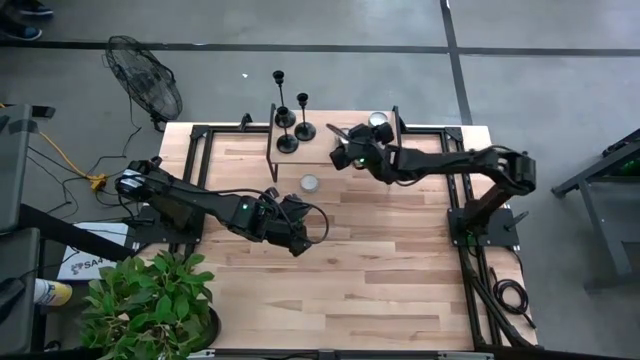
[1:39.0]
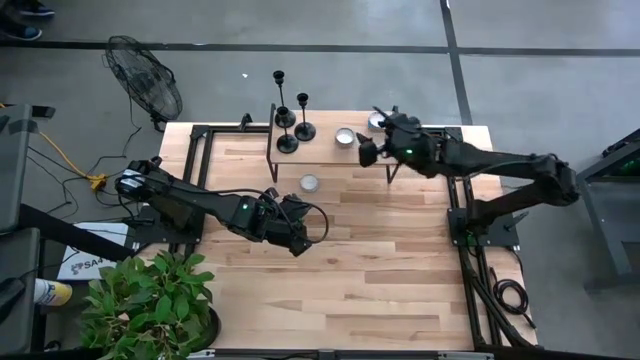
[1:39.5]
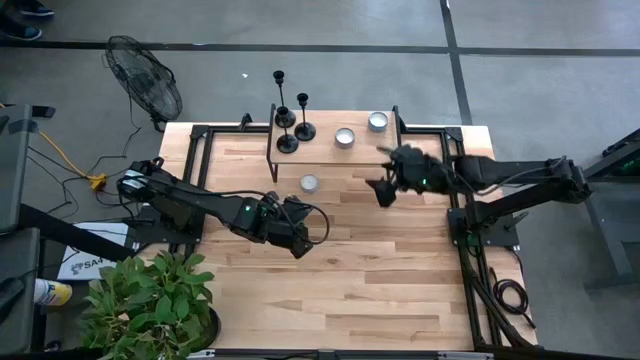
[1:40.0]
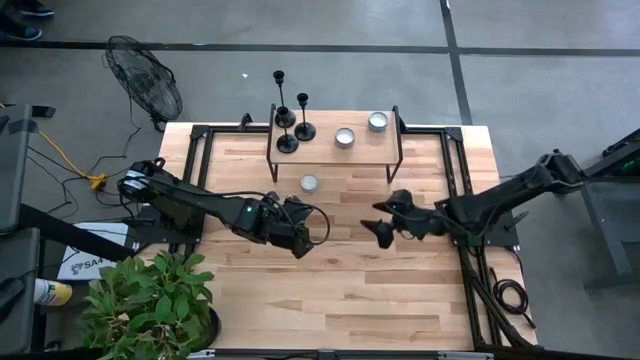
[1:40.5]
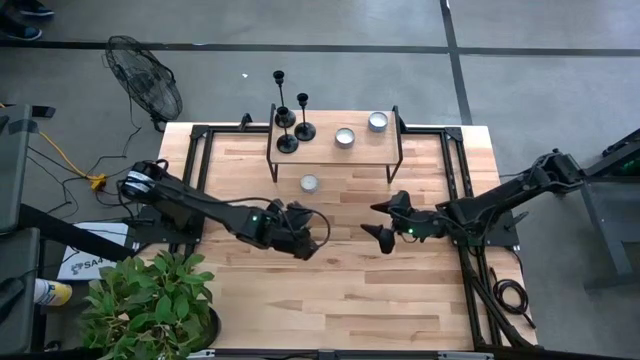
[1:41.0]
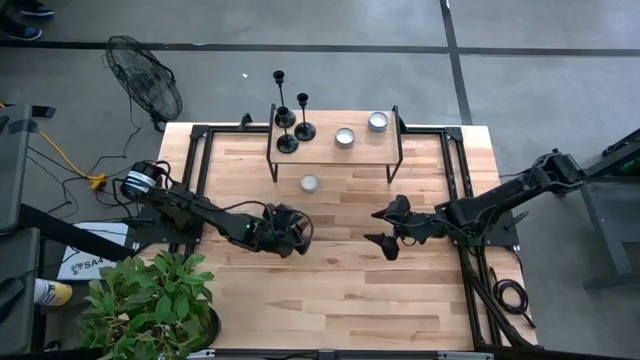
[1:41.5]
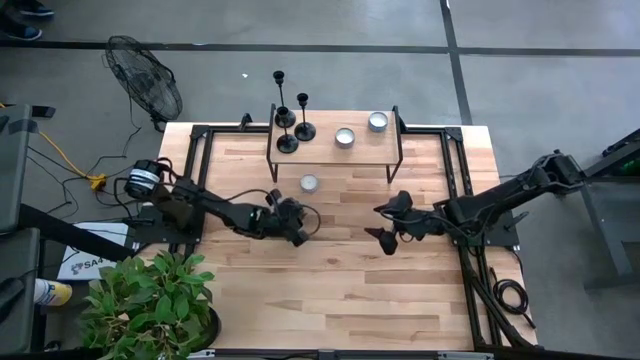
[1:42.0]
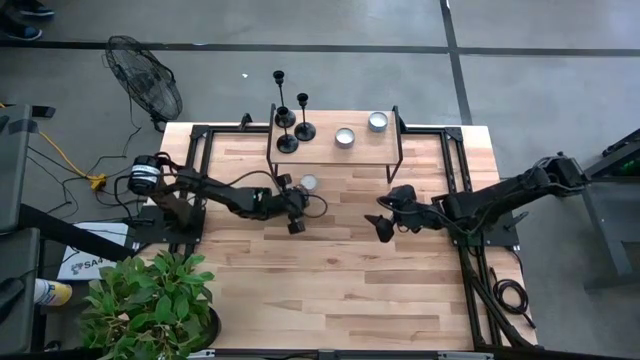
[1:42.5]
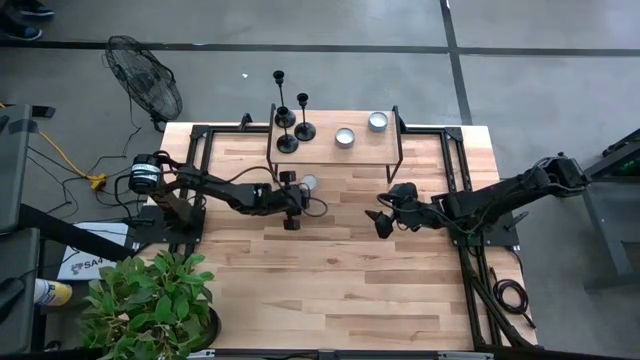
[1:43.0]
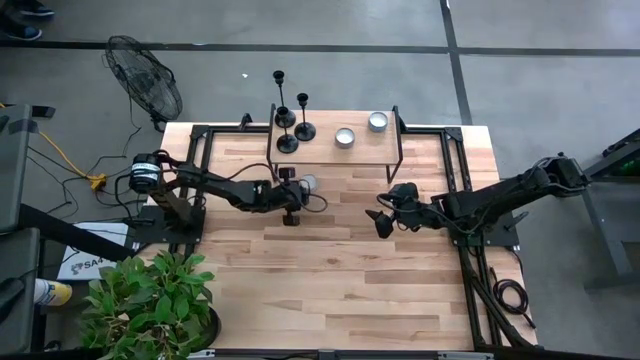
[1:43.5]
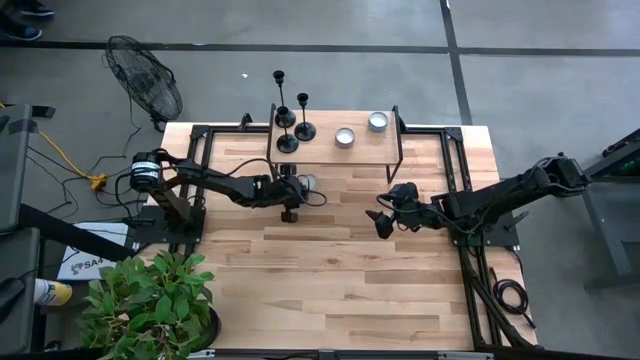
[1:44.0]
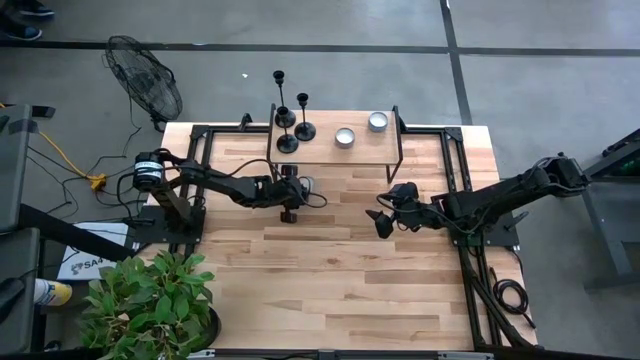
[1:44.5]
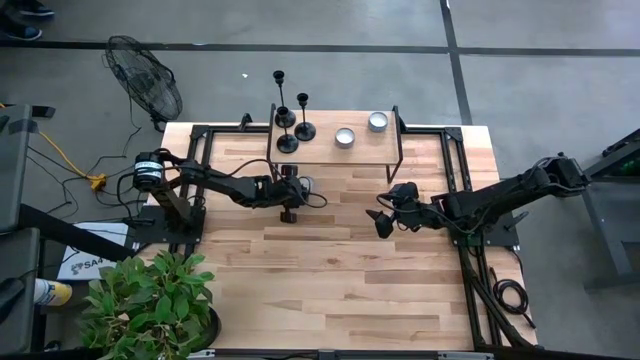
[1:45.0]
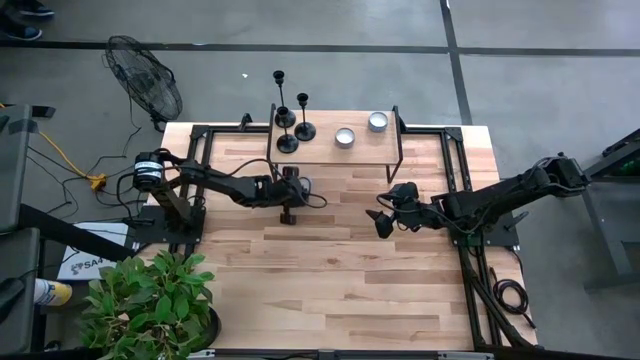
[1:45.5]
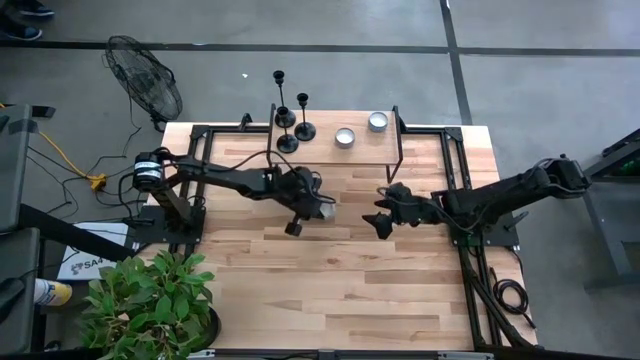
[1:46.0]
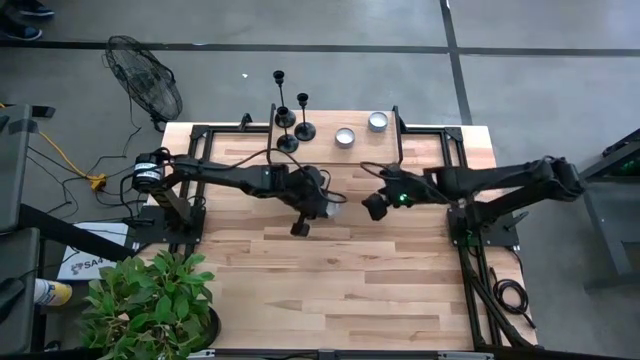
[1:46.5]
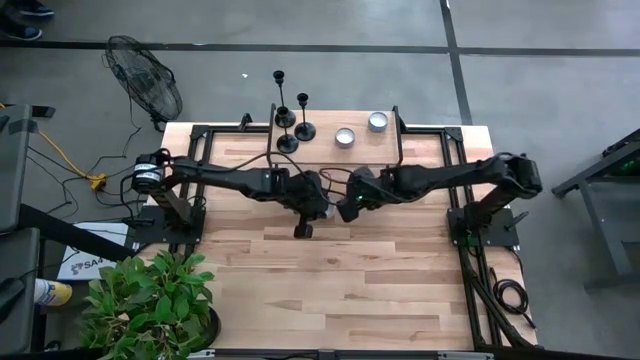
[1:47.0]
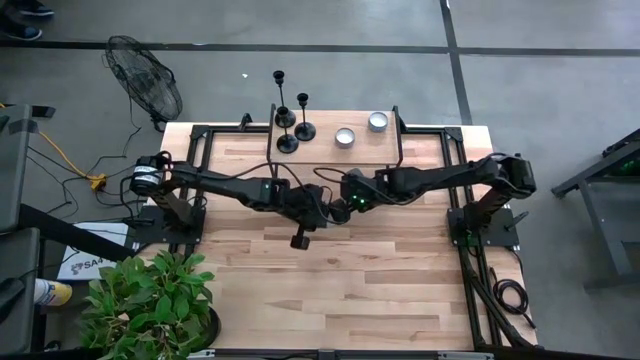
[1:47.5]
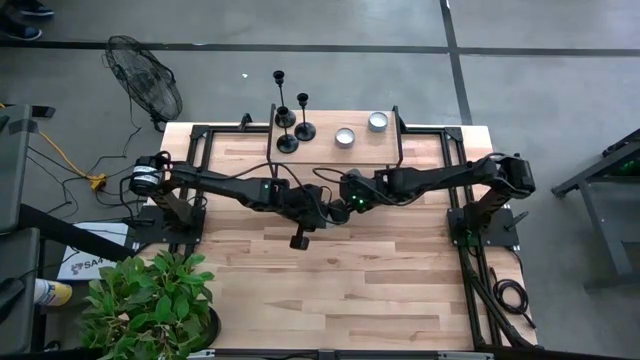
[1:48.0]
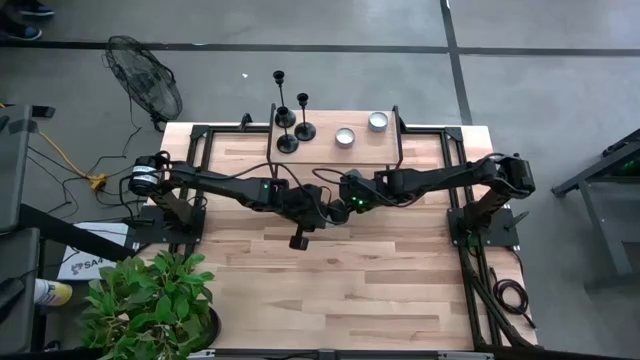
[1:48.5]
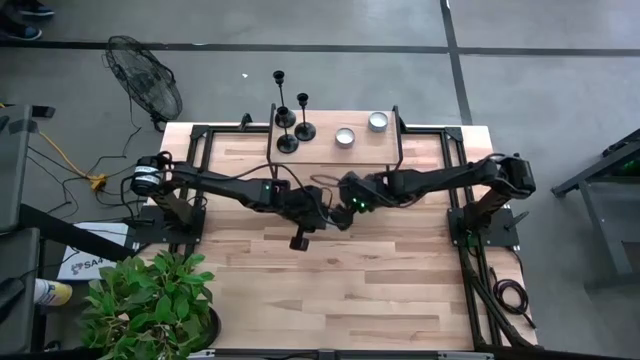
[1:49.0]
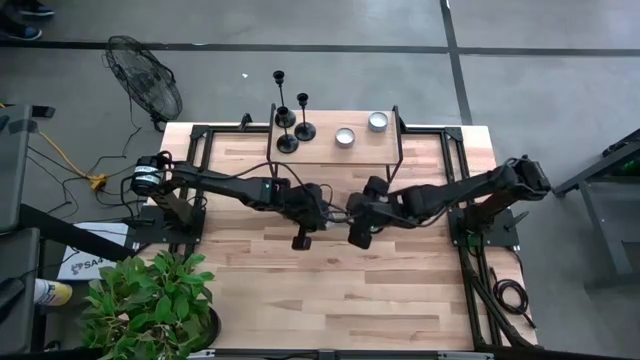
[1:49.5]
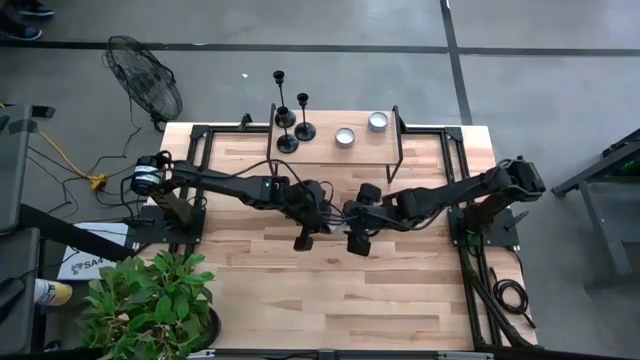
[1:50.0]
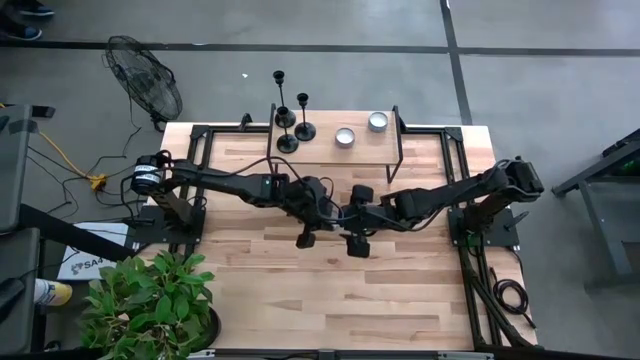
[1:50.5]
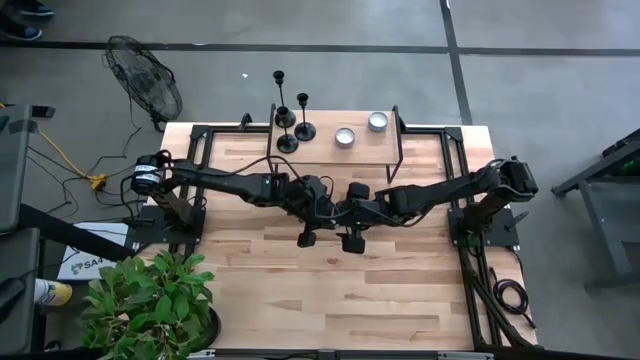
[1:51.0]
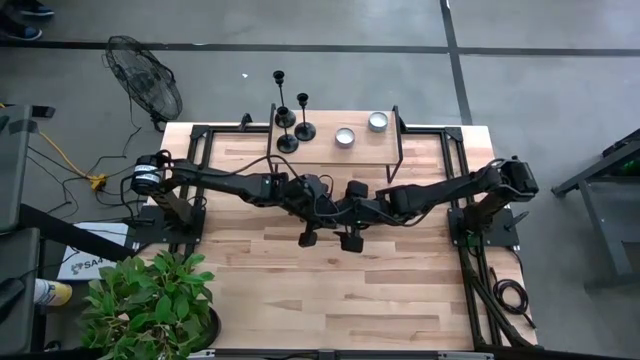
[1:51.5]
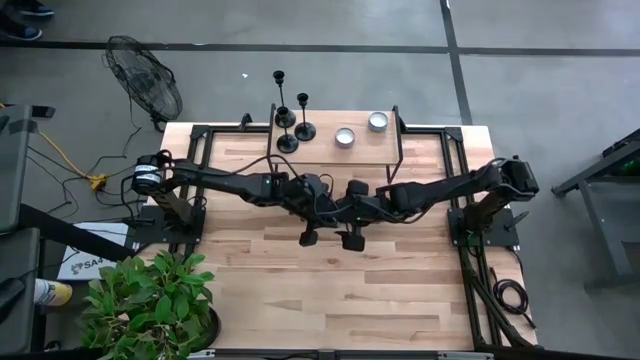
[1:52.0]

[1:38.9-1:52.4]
Task: Pick & Place candle stick holders
Put the white scented candle on the shelf

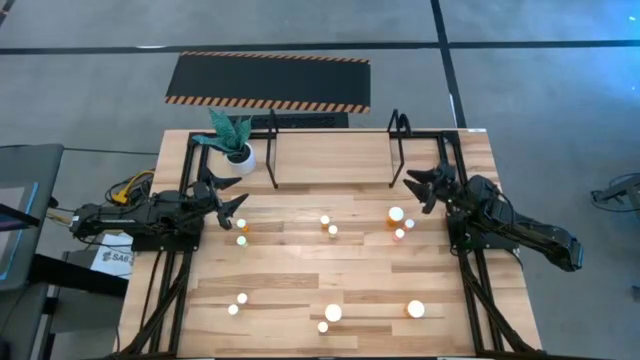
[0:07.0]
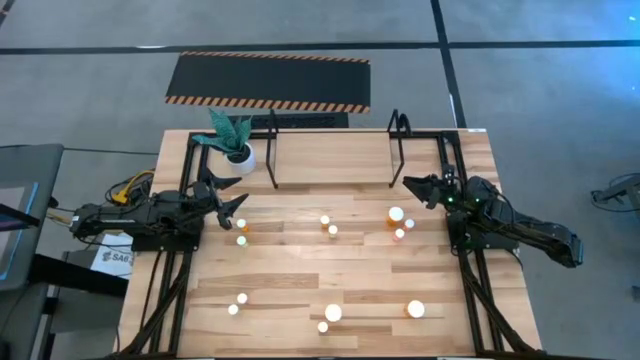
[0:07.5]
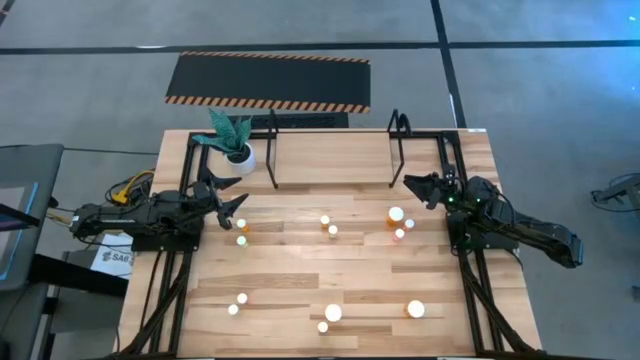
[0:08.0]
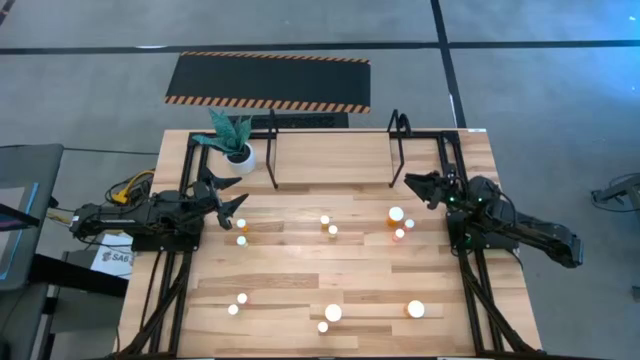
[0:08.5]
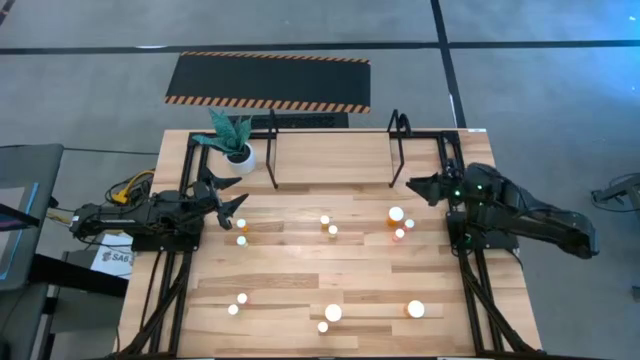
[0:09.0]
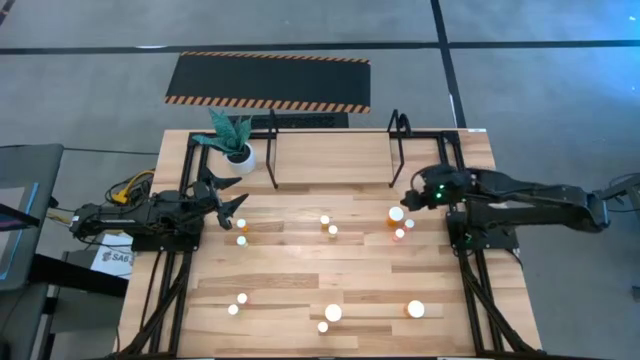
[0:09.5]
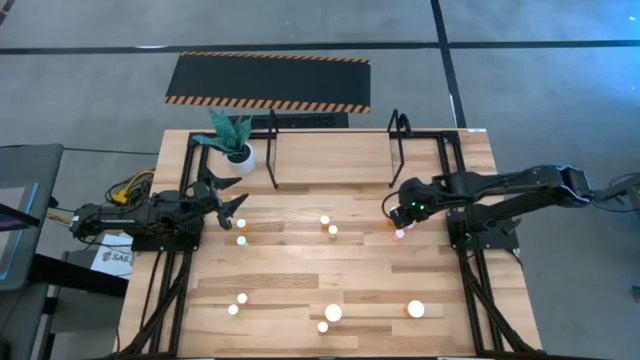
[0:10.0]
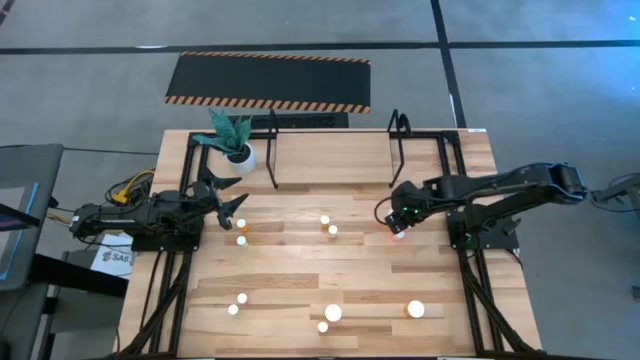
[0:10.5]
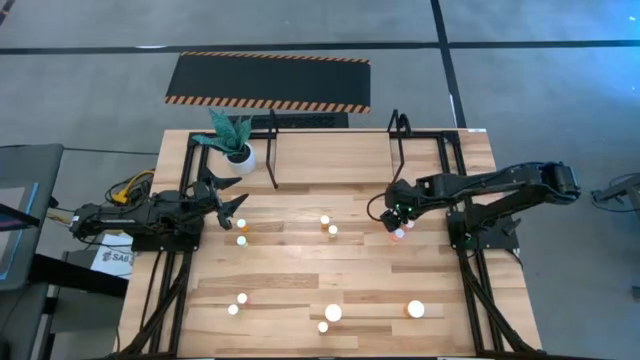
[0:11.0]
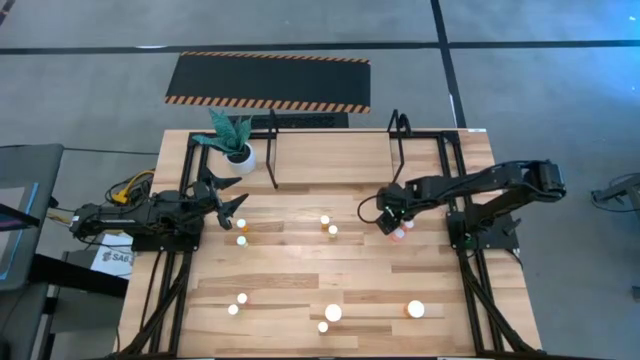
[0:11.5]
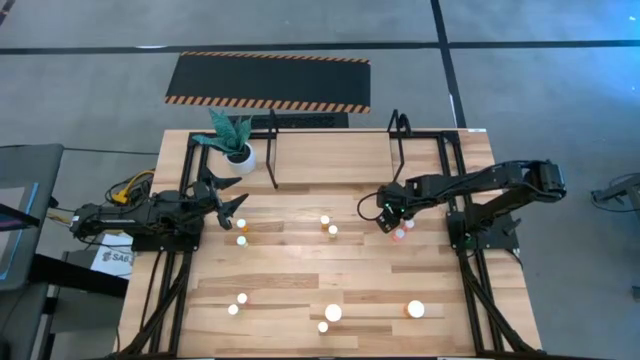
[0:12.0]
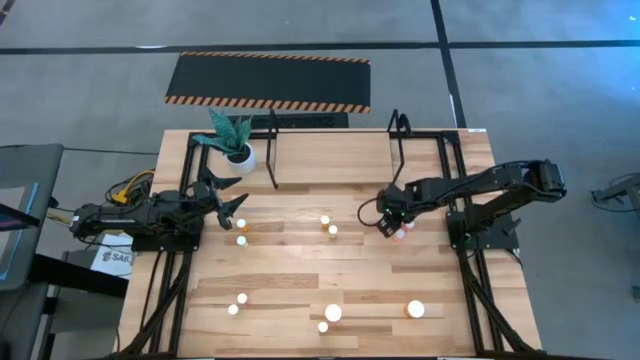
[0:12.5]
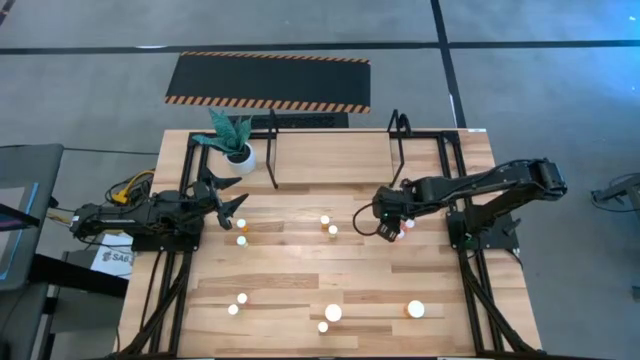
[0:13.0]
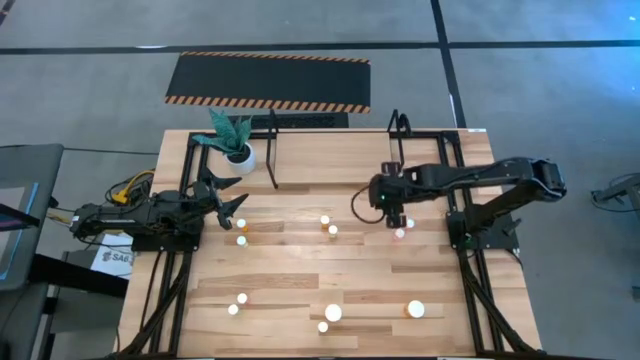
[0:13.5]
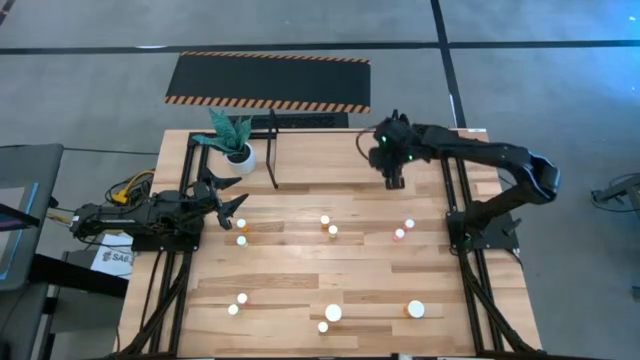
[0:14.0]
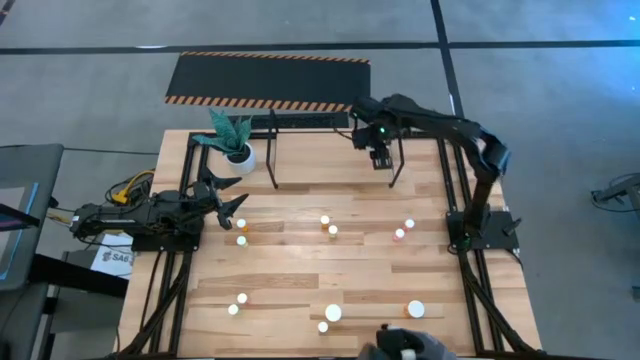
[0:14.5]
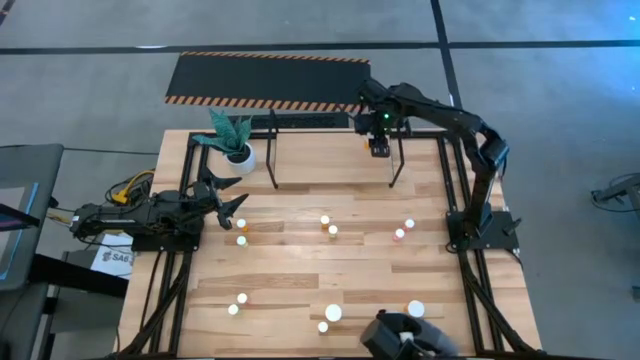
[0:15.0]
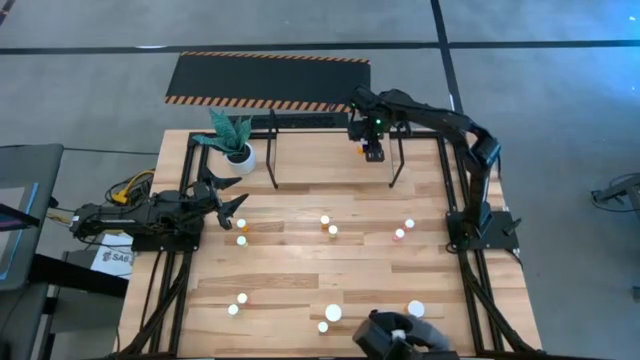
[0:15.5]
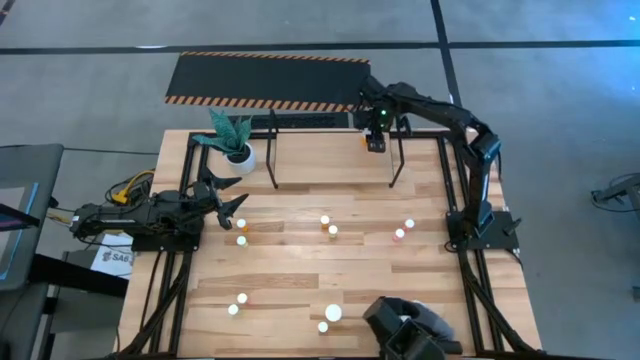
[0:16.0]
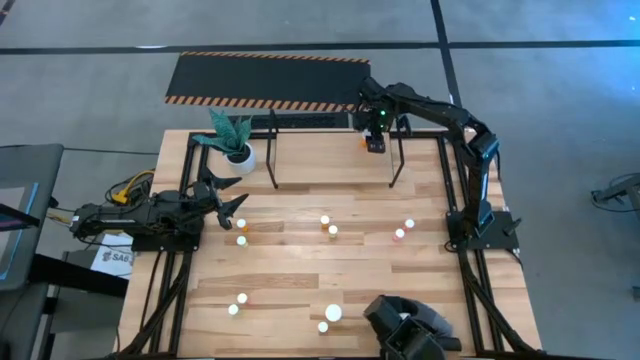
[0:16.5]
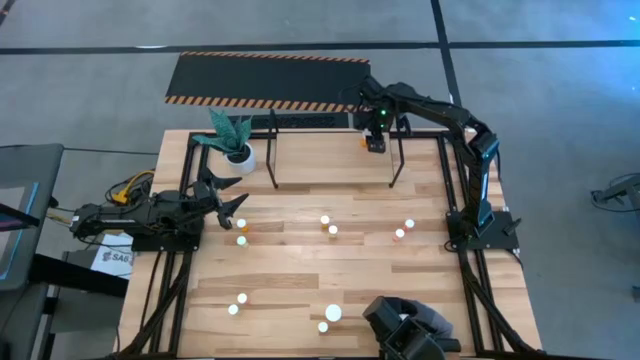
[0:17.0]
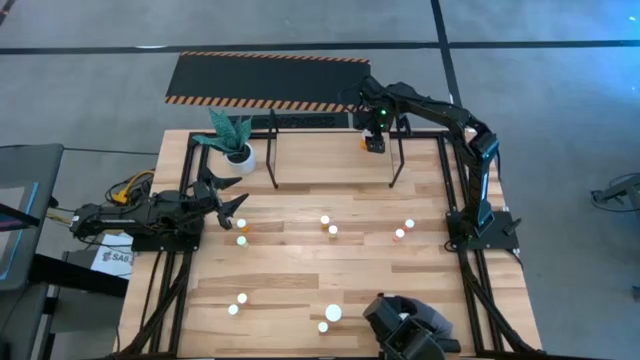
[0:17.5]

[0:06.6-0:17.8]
Task: Pick and place medicine bottles onto shelf by color
Put the top right big orange pill bottle on the shelf
